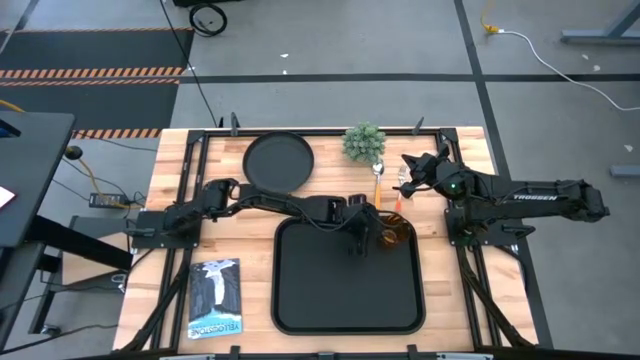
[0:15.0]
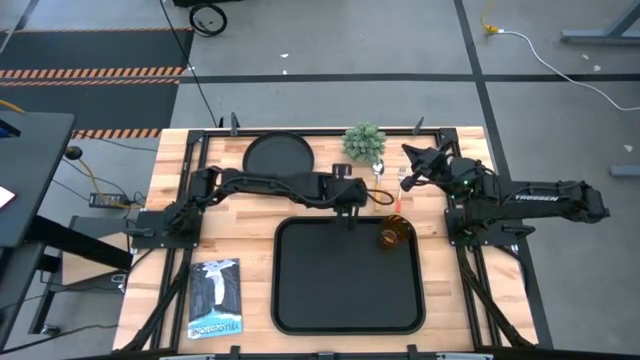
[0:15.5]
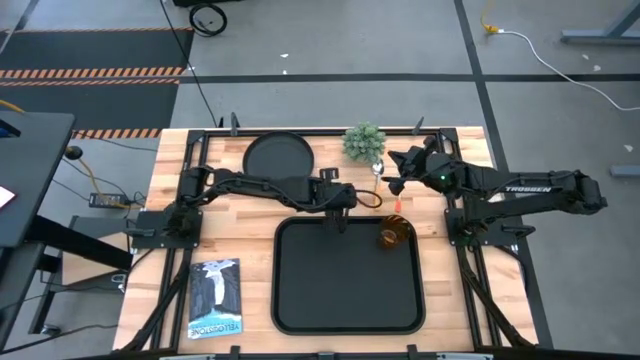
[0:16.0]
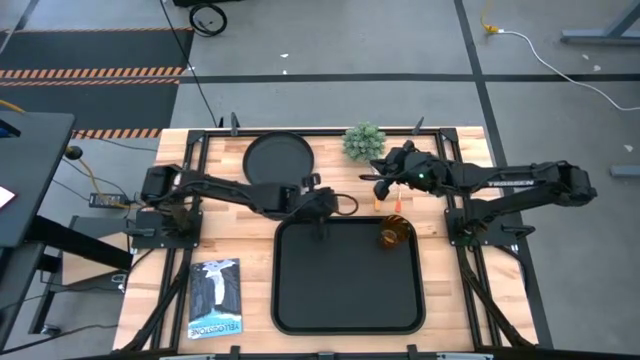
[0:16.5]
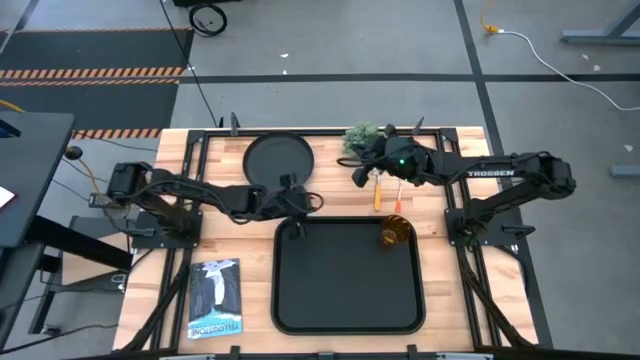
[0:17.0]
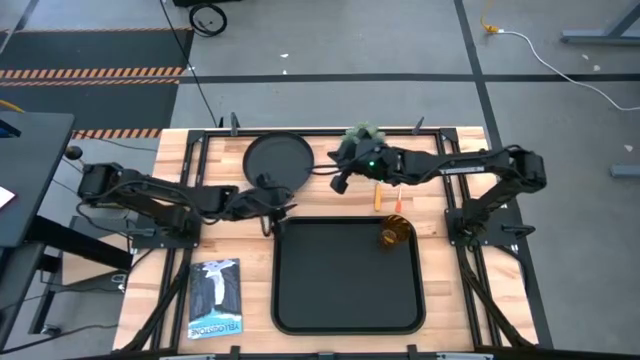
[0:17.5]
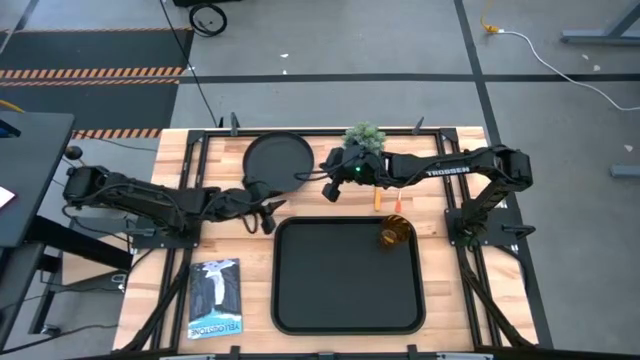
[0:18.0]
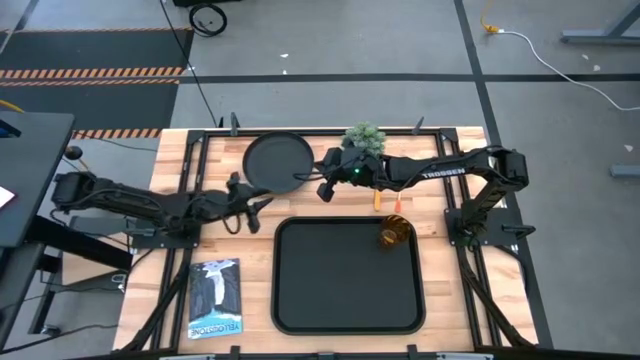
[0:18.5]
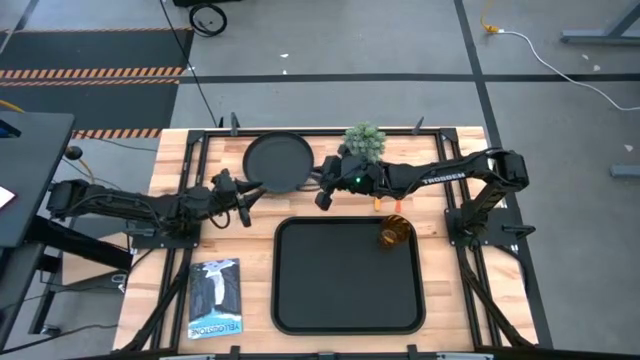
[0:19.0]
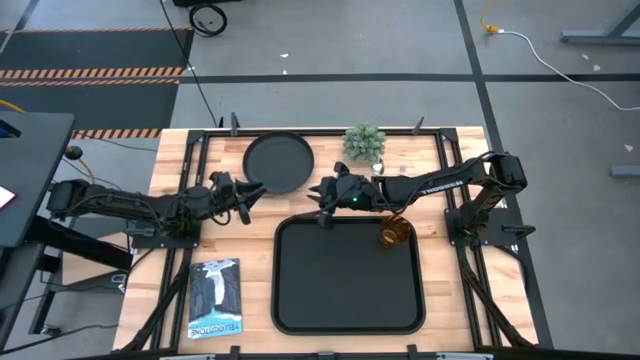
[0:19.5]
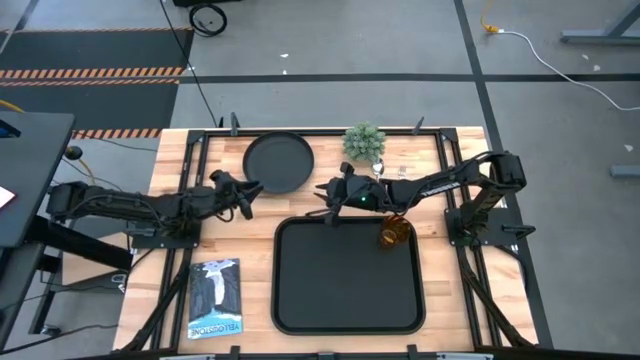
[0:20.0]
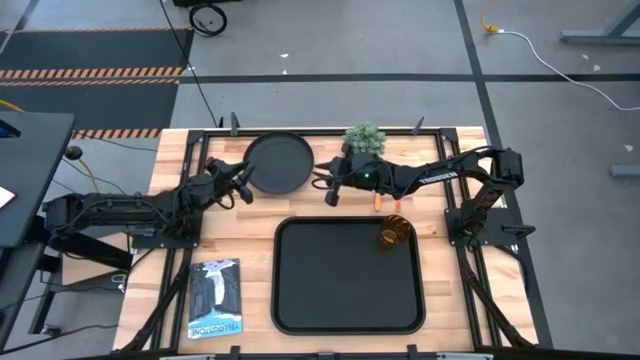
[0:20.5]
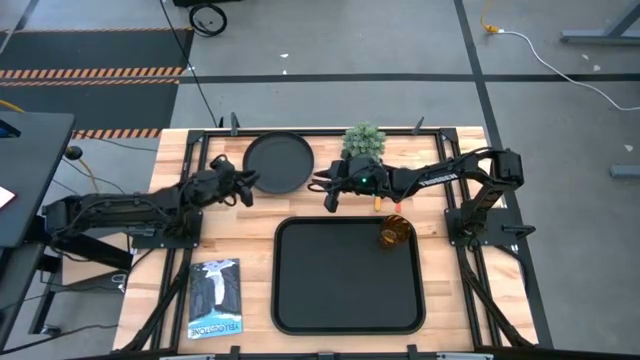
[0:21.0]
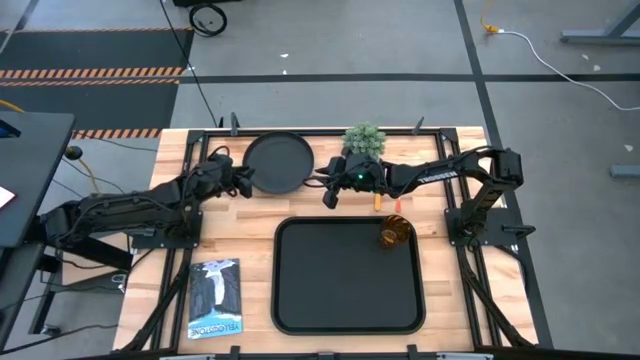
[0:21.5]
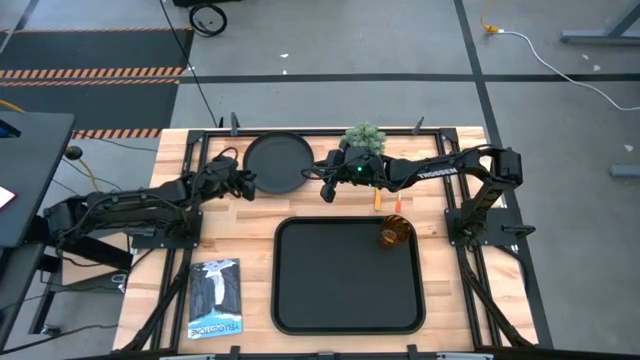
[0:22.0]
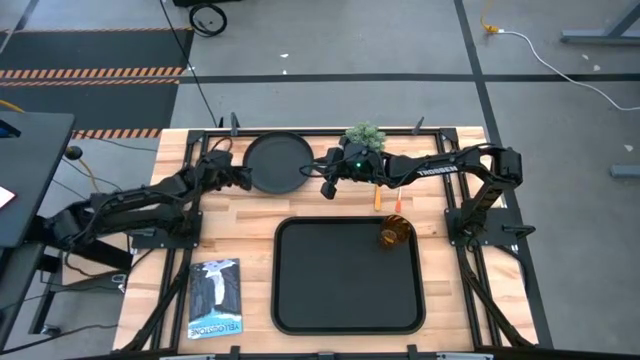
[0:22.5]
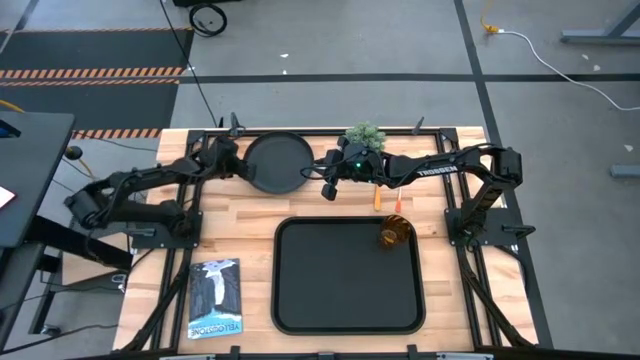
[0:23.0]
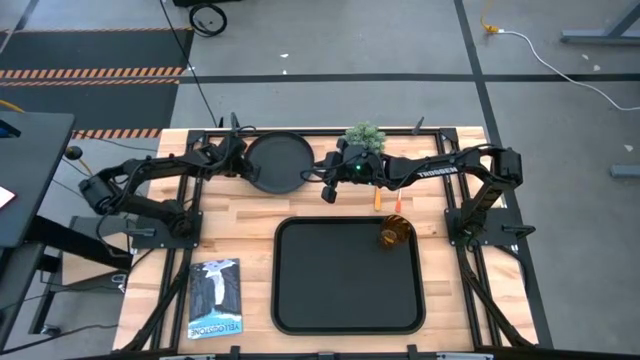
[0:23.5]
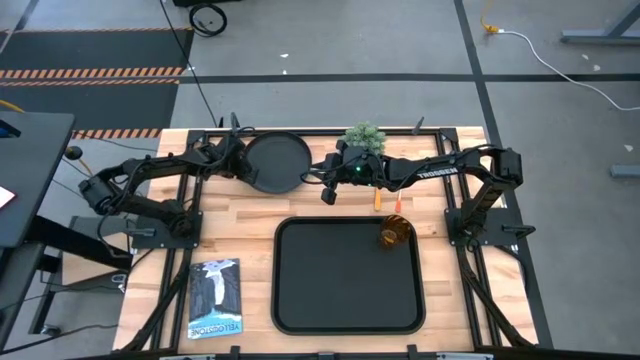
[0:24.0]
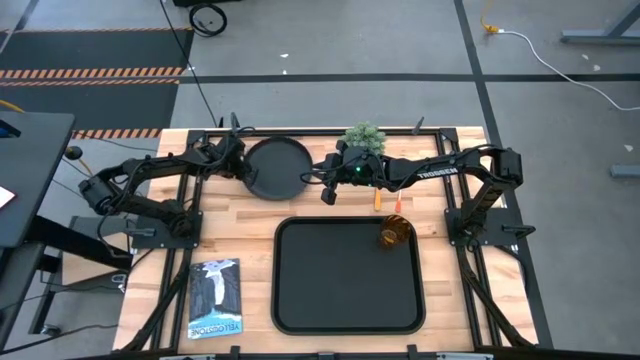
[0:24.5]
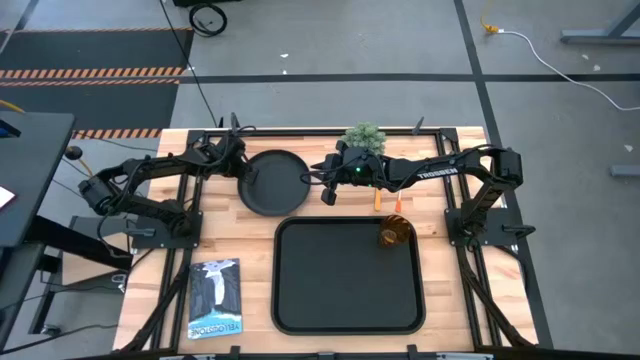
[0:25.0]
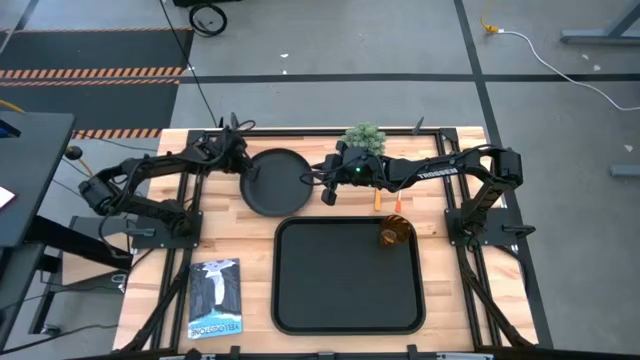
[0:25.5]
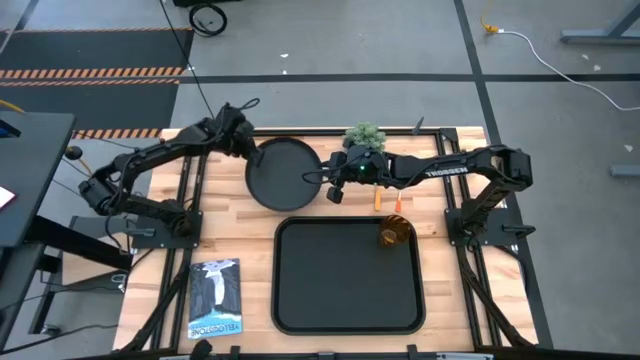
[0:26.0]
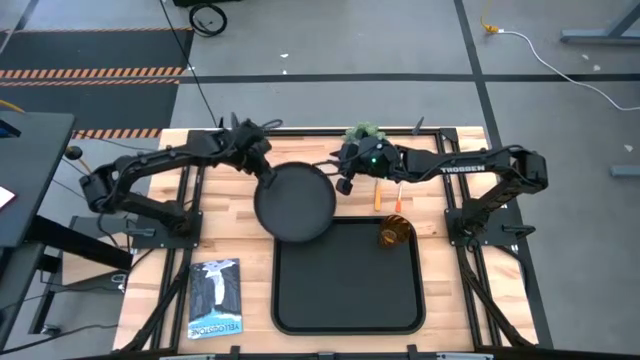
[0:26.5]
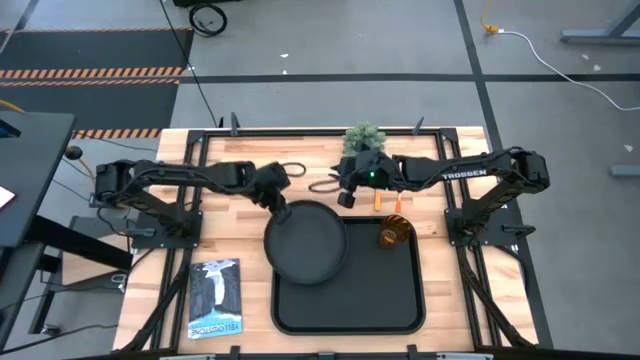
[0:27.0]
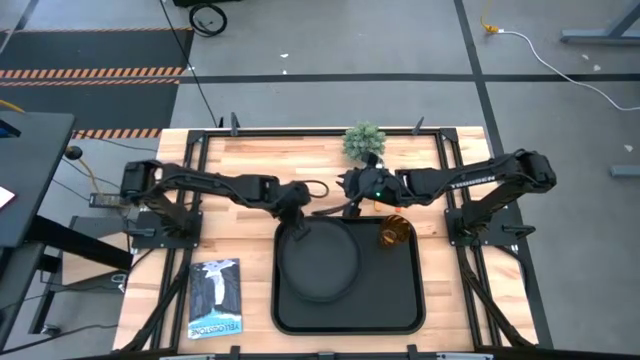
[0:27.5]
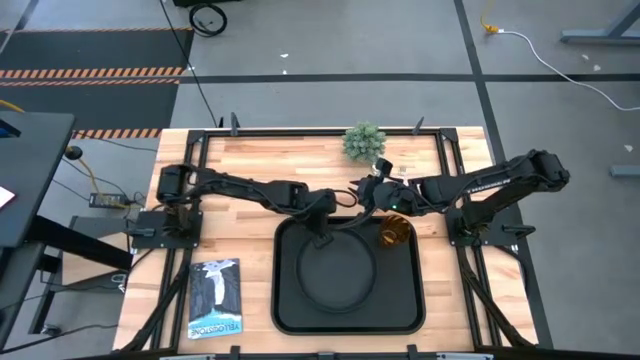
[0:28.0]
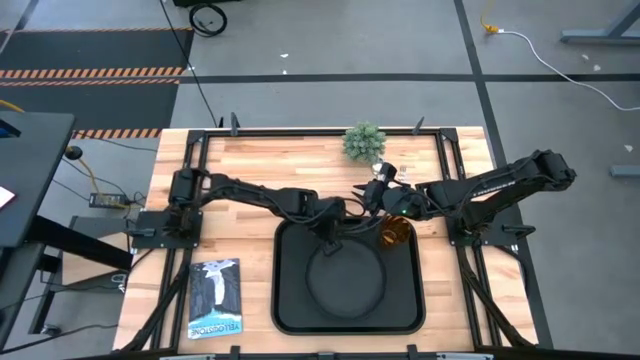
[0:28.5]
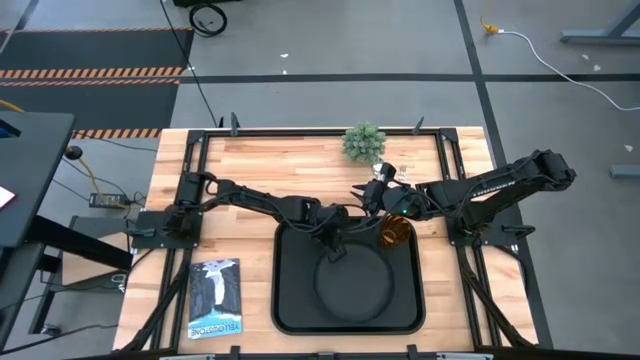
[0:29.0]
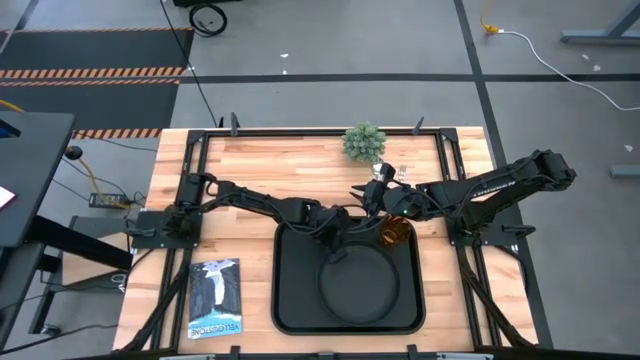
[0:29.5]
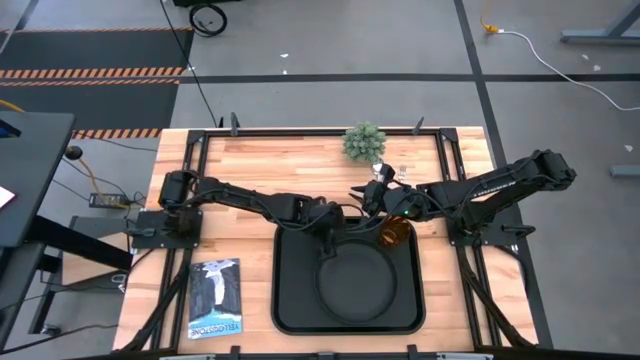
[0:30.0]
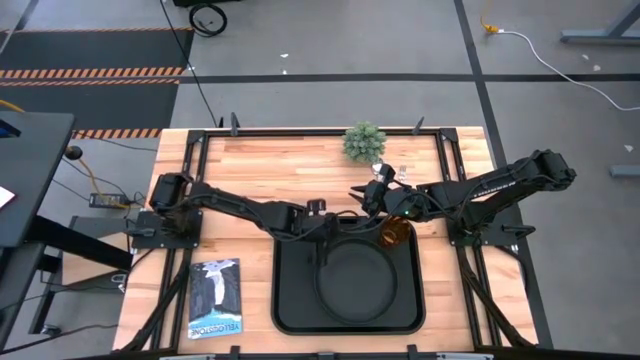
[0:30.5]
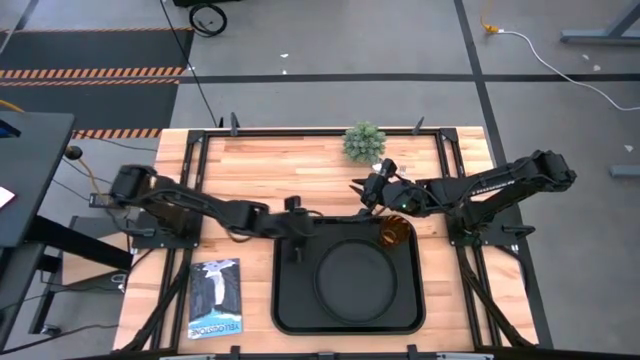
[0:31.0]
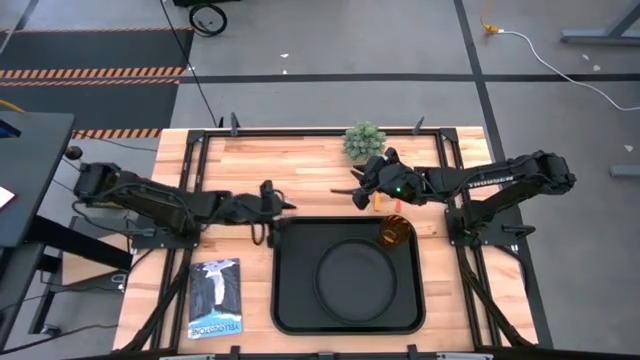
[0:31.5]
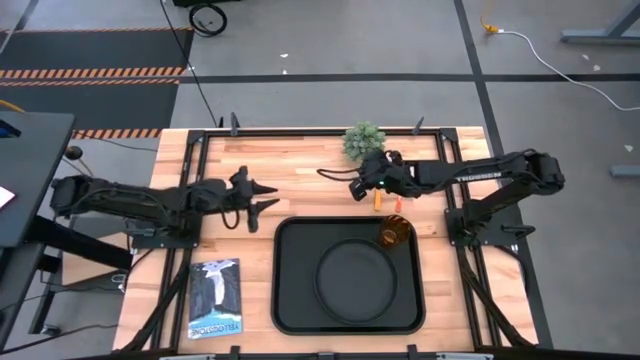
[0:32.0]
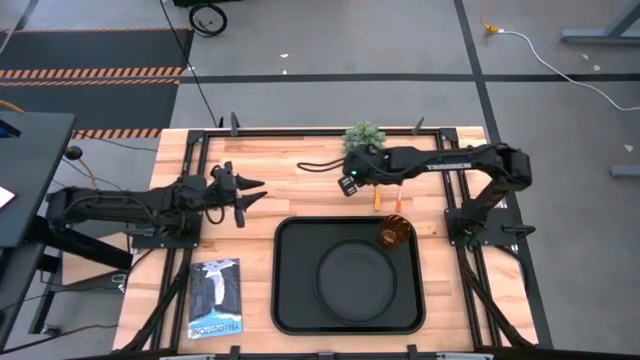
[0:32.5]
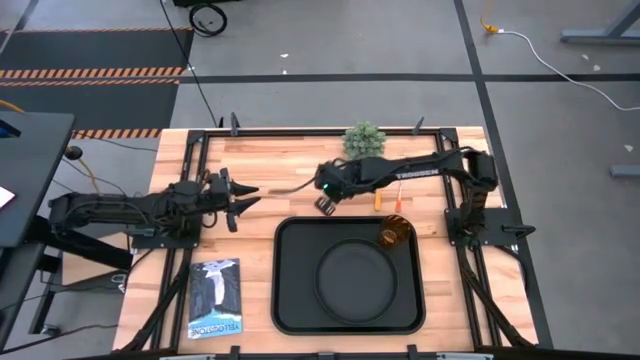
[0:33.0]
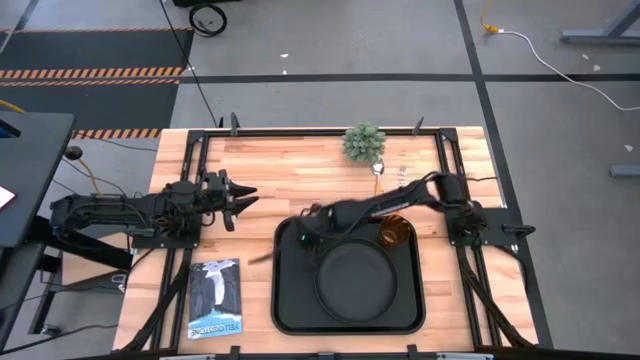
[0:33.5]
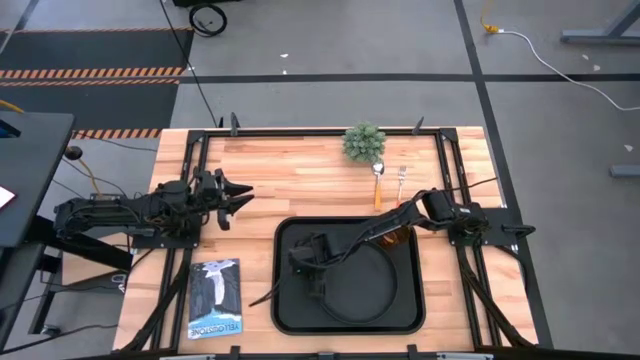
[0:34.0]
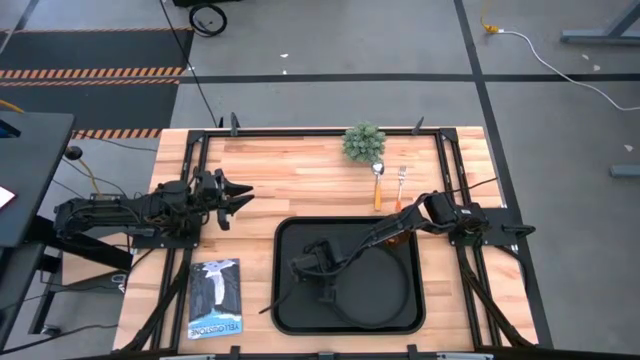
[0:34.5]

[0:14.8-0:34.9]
Task: Pick and place plate/cup/fork/spoon on tray
Put the black plate on the black tray at the bottom of the brown cup

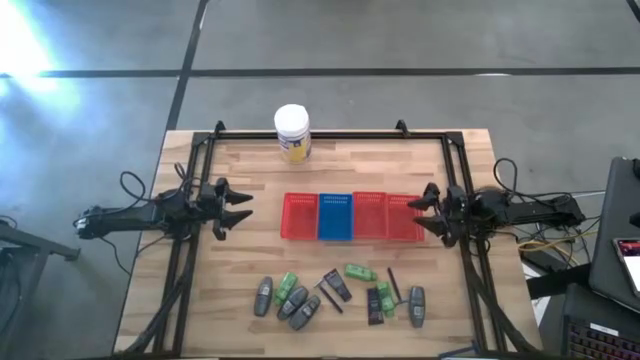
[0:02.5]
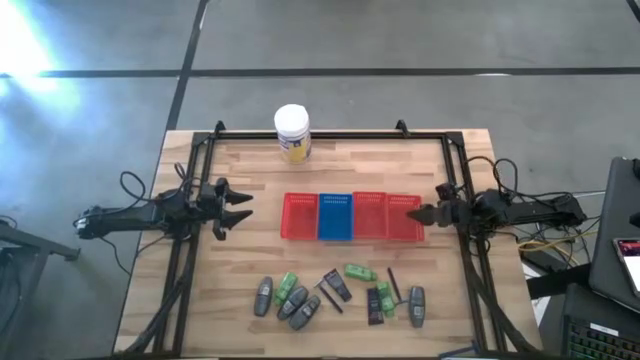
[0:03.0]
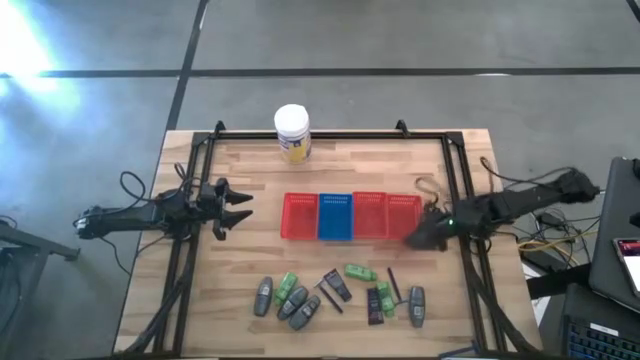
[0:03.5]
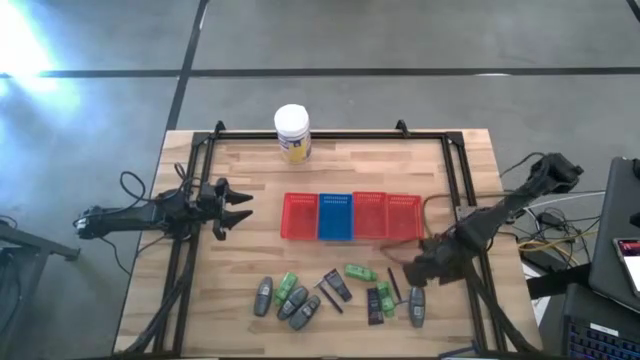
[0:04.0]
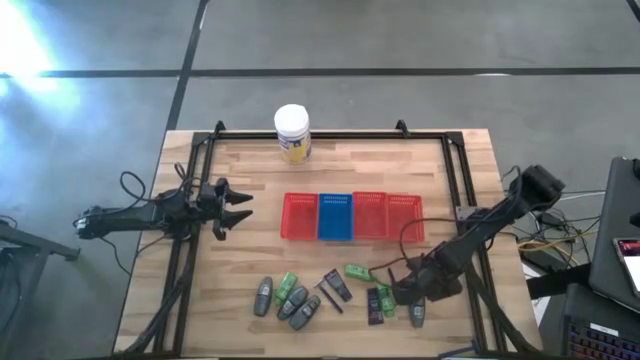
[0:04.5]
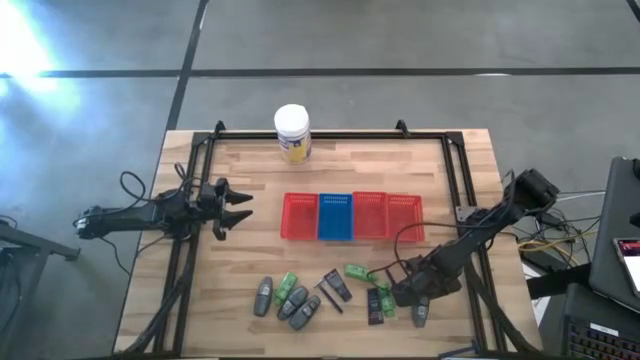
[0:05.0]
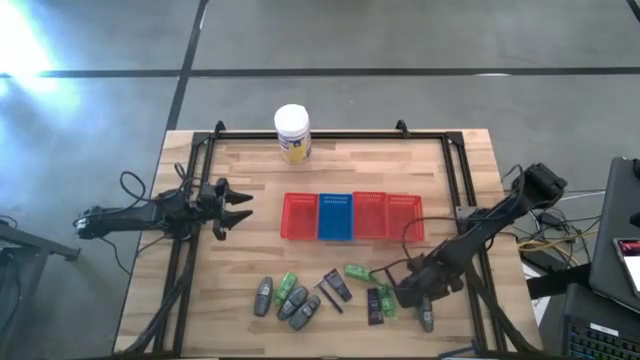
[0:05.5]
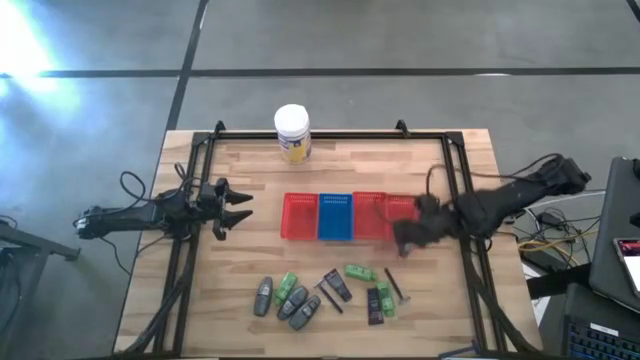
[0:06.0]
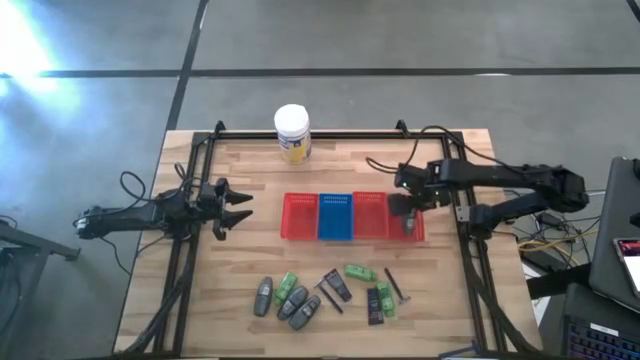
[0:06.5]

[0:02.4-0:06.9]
Task: Pick & Place Travel size toiletries
Put the gray deodorant into the right red bin
